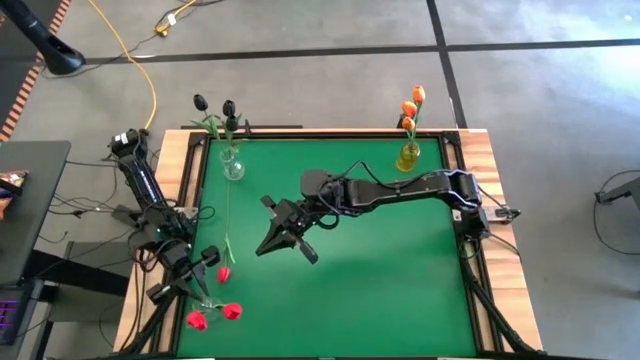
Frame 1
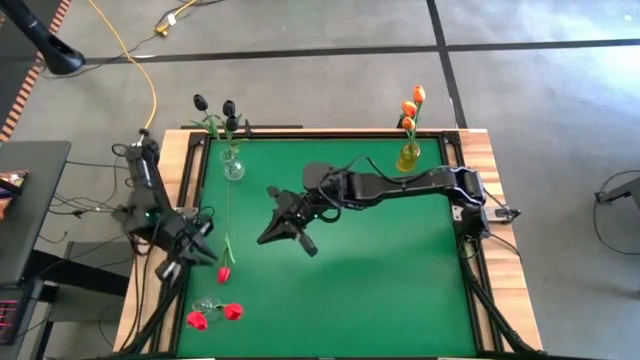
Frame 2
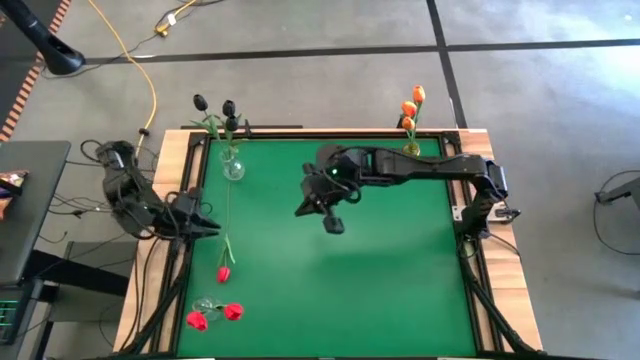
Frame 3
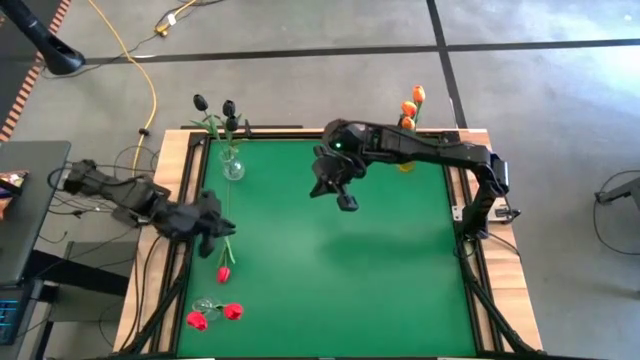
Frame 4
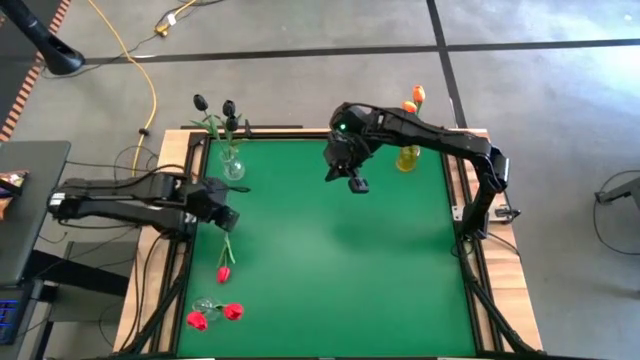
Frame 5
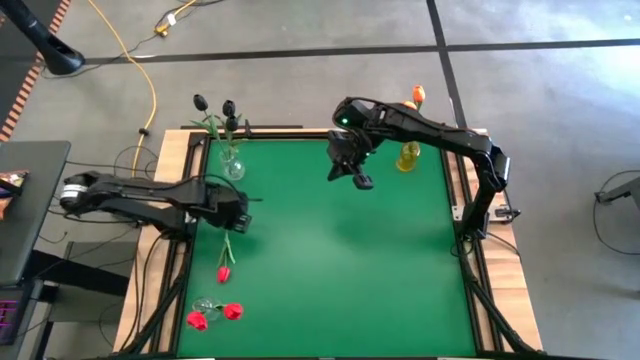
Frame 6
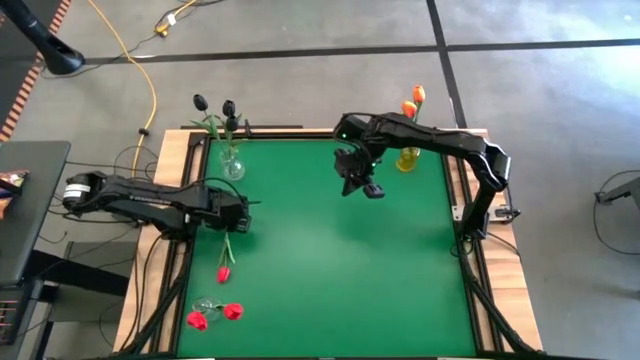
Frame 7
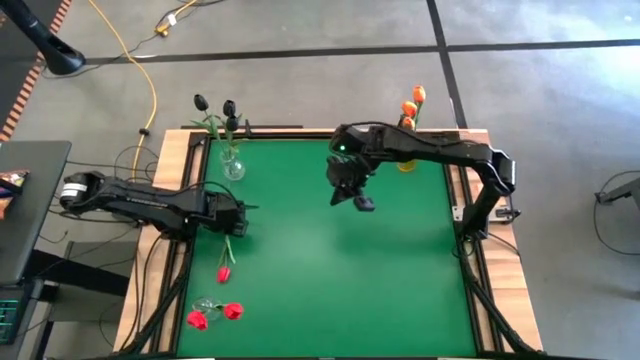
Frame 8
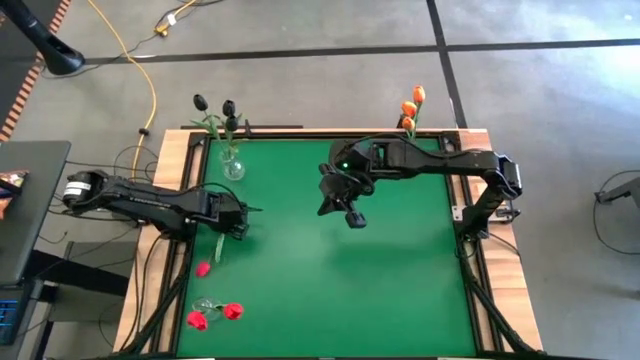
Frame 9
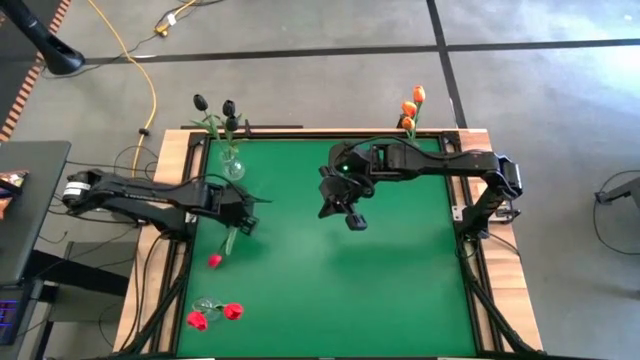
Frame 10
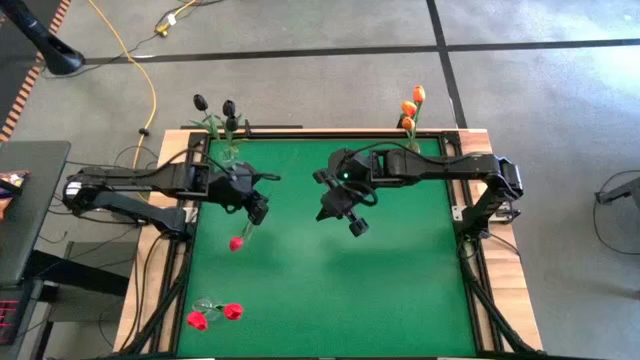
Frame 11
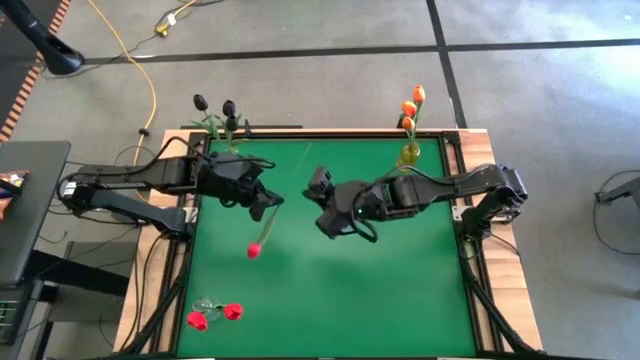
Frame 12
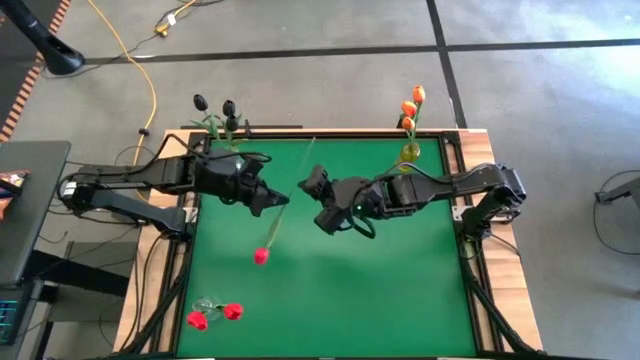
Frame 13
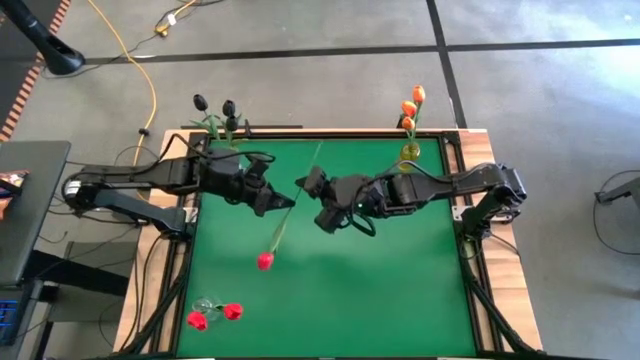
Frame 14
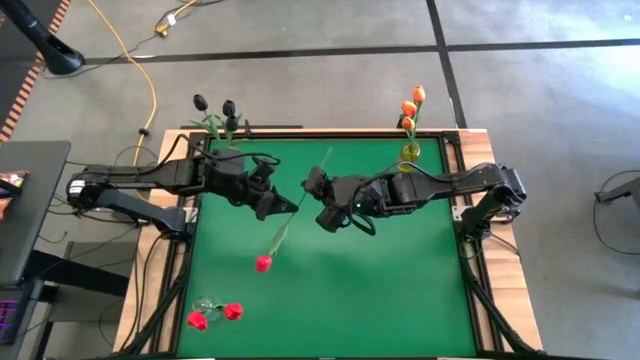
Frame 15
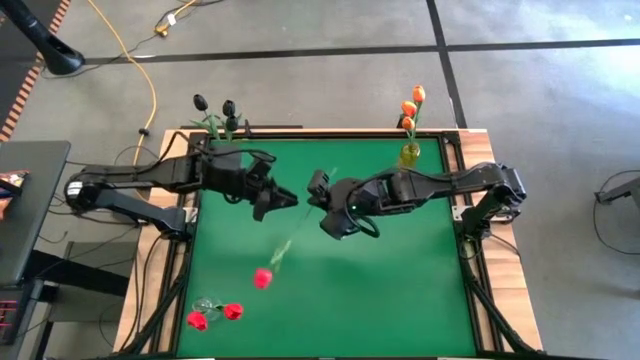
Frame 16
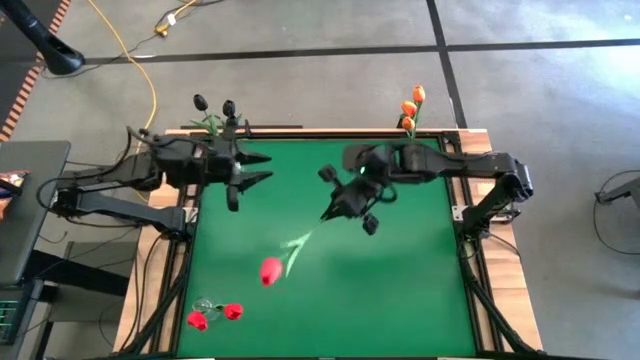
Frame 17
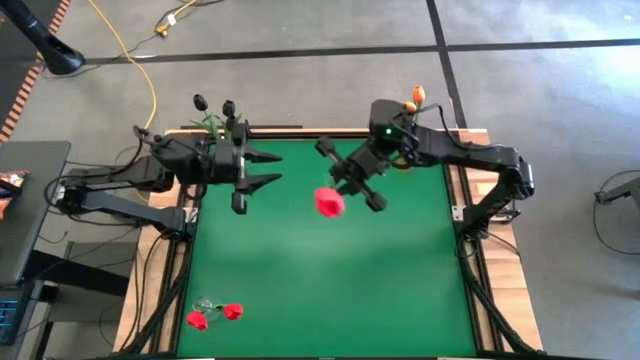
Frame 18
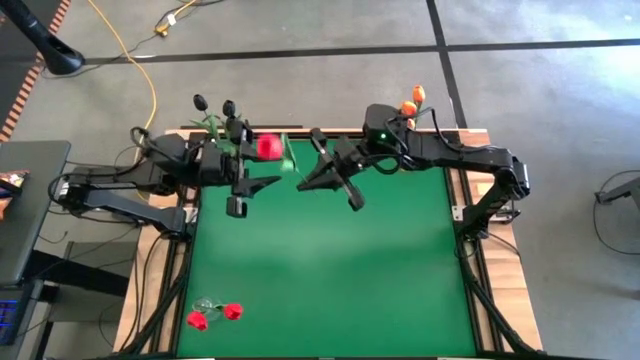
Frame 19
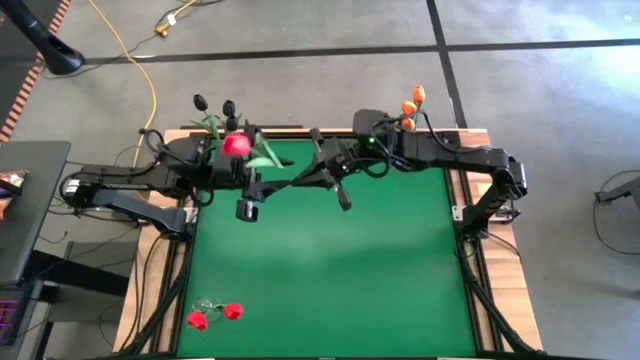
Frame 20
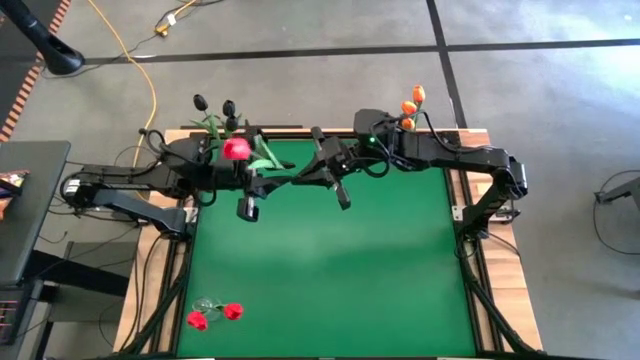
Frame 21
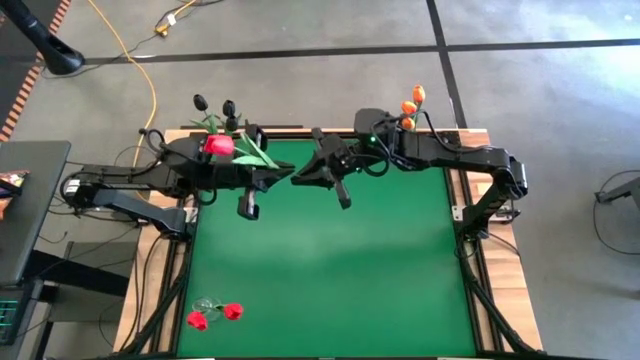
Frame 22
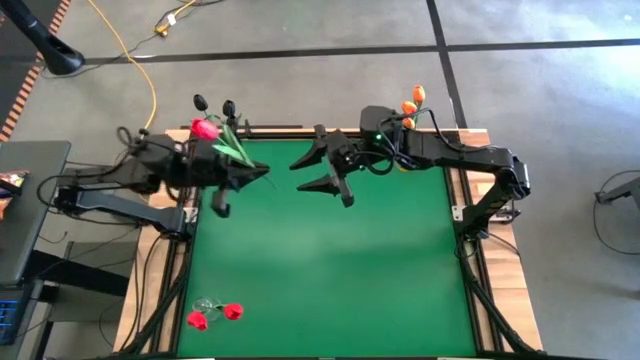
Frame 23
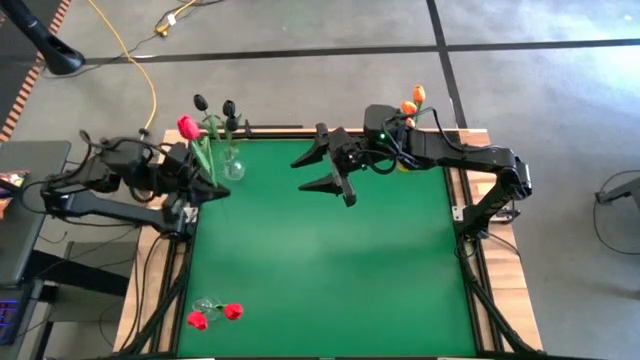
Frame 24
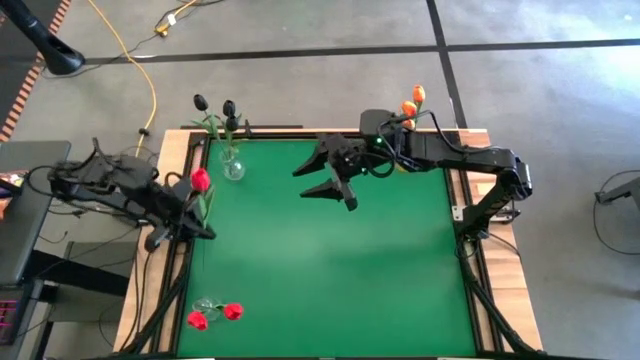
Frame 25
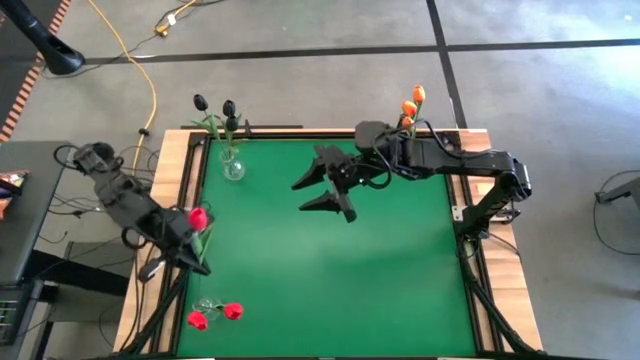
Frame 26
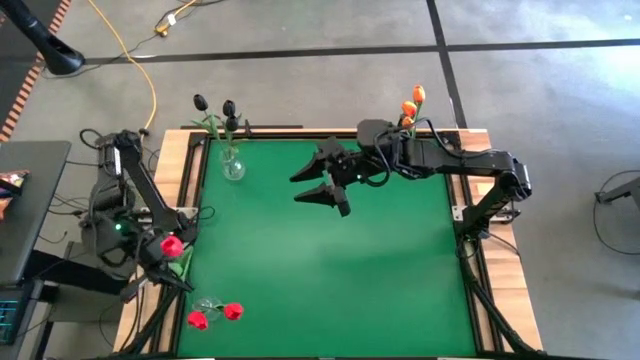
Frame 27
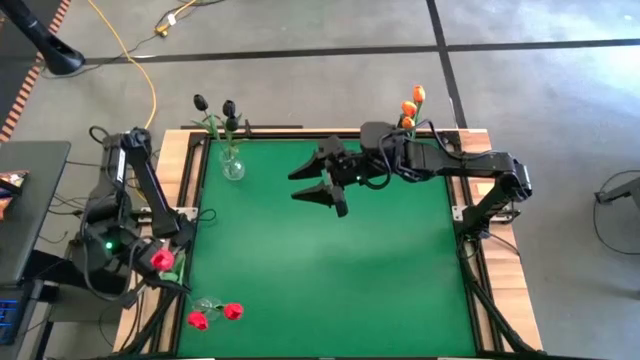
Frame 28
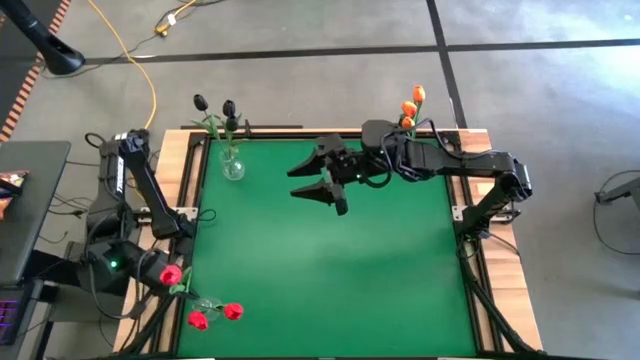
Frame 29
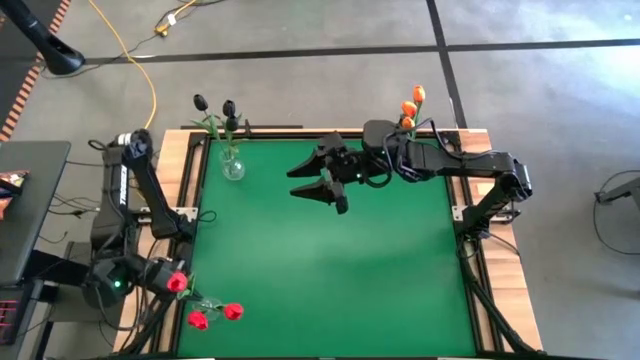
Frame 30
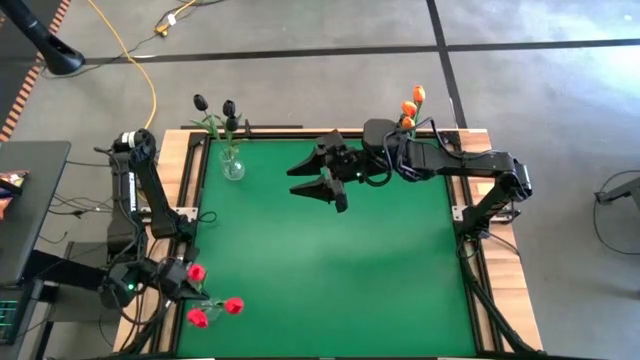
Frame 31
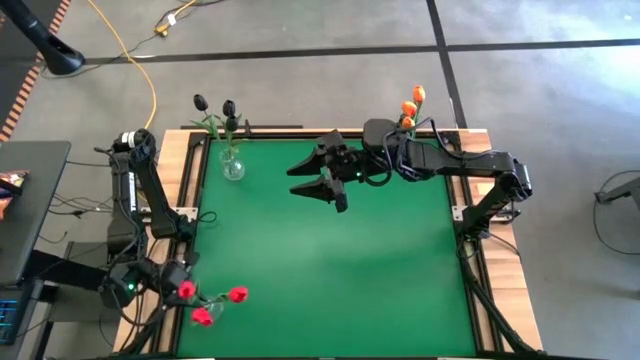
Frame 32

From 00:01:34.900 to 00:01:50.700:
Task: Sort flowers into vase by color
Put the left red flower into the bottom transparent vase

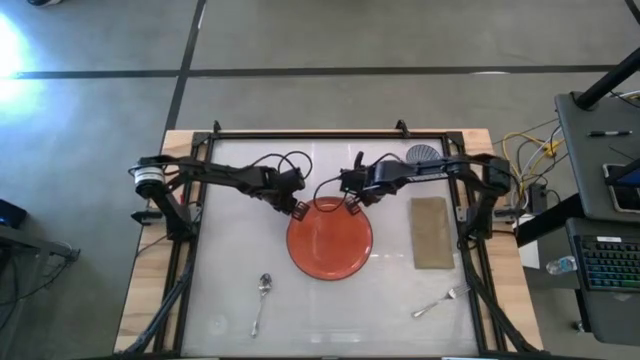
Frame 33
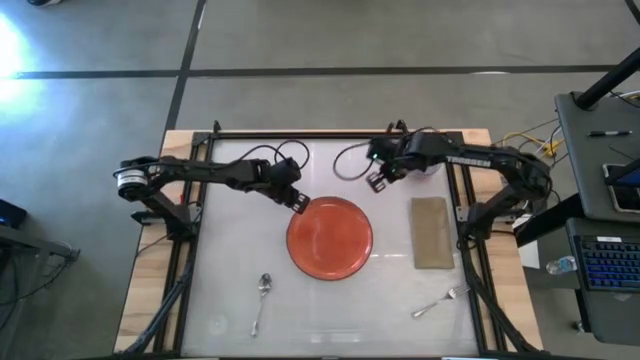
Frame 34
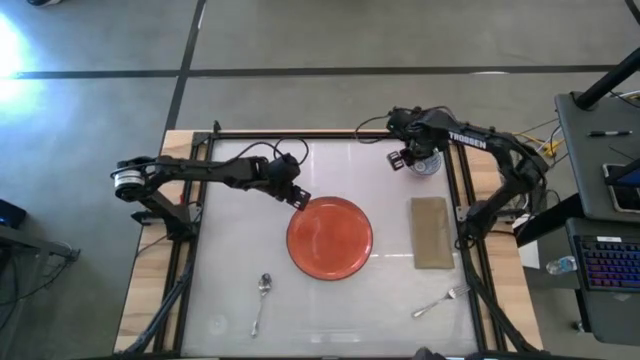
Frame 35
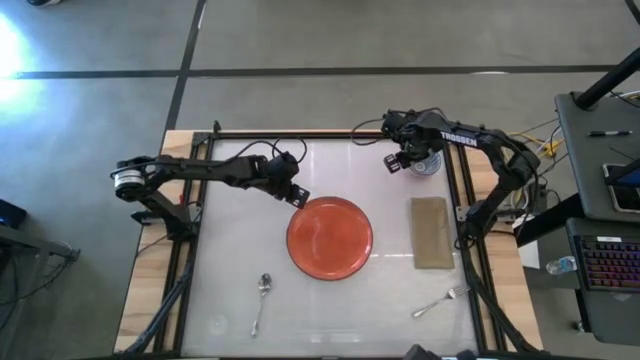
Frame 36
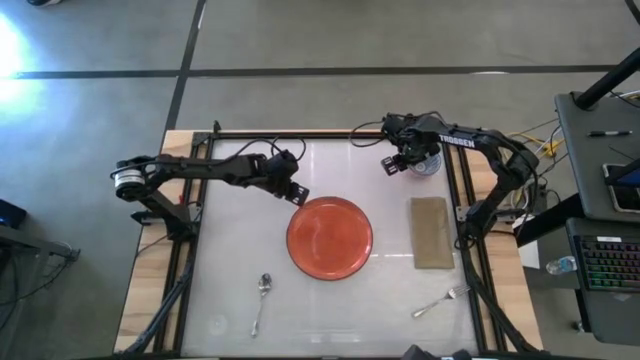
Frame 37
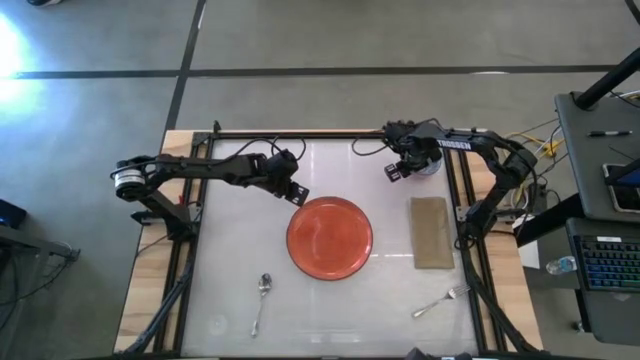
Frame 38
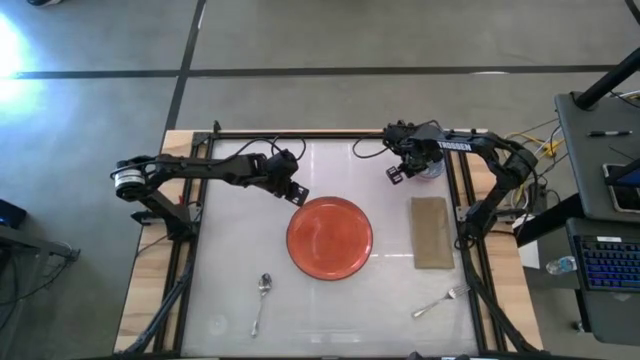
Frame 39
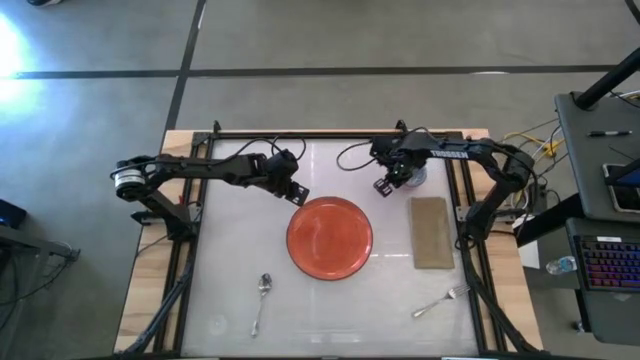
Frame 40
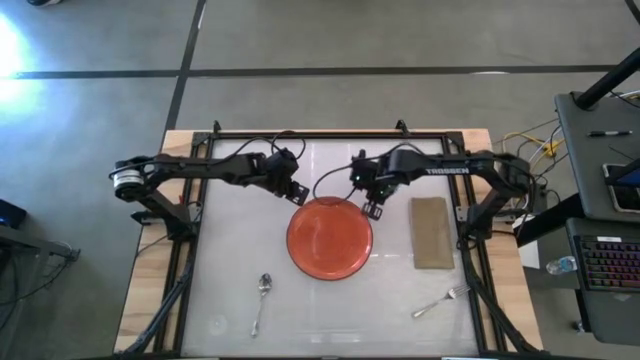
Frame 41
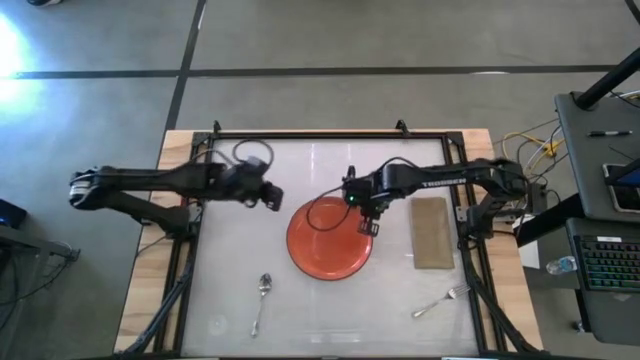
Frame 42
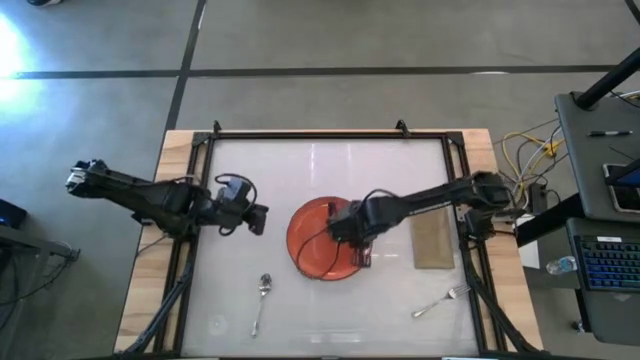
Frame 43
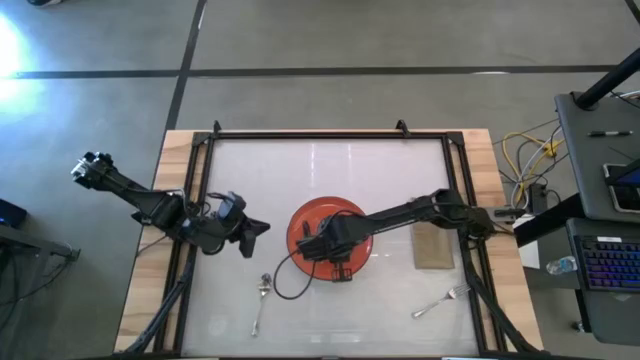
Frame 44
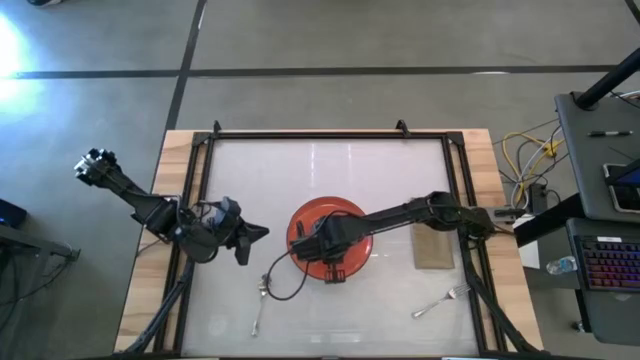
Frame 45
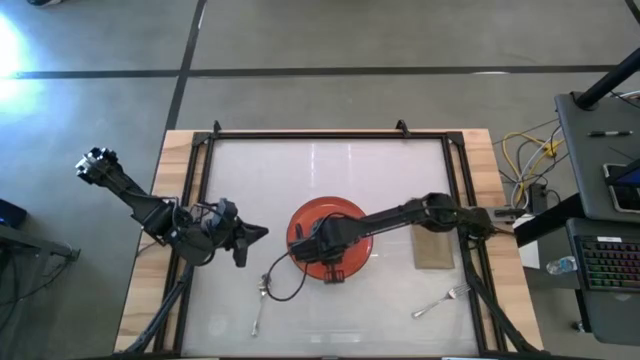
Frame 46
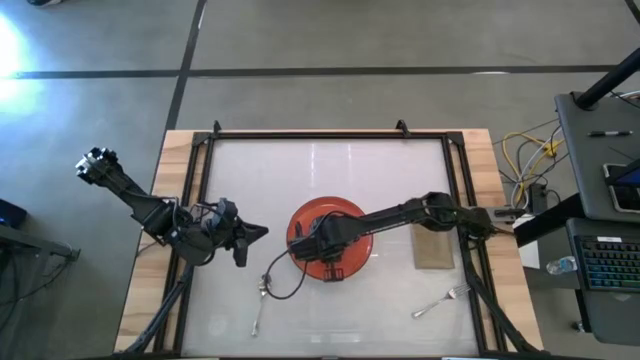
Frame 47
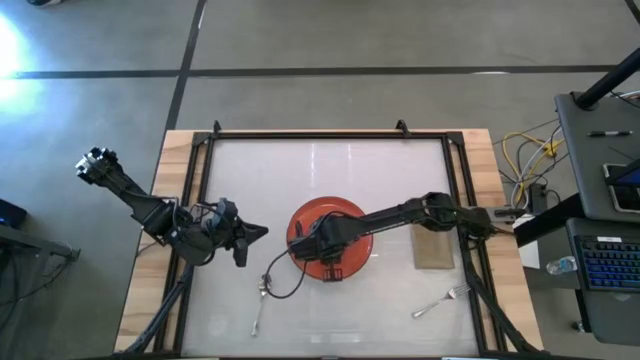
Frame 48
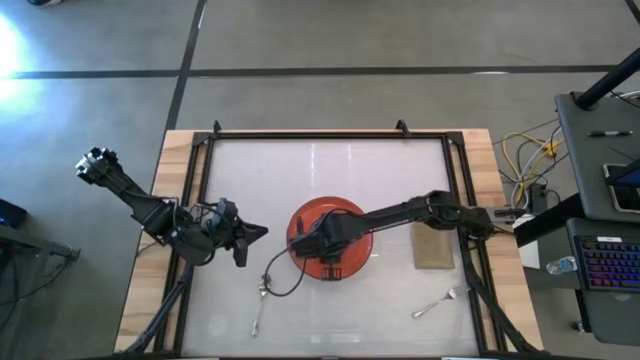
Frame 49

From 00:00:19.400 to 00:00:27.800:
Task: Set table place
Put the blue bowl on the orange plate
